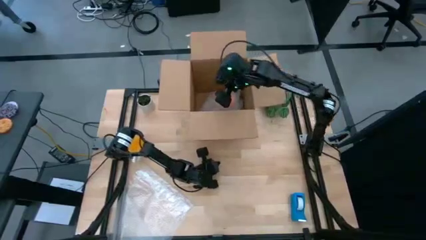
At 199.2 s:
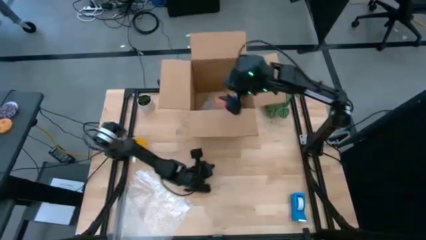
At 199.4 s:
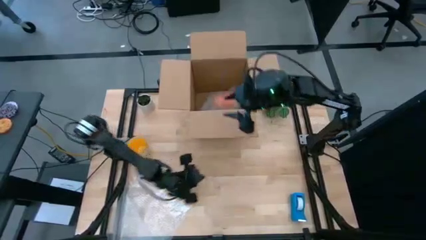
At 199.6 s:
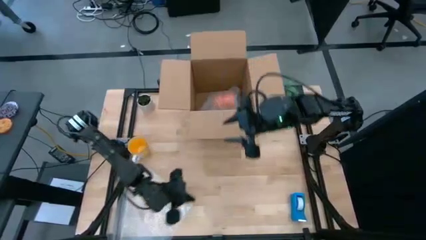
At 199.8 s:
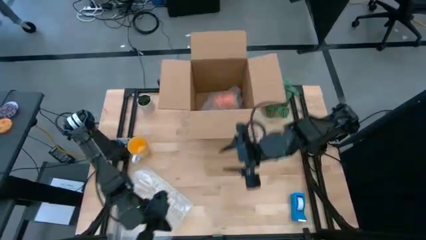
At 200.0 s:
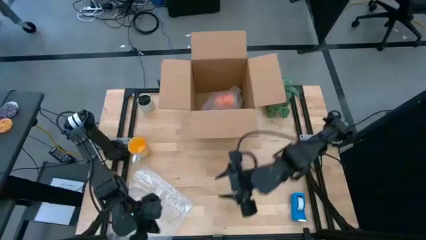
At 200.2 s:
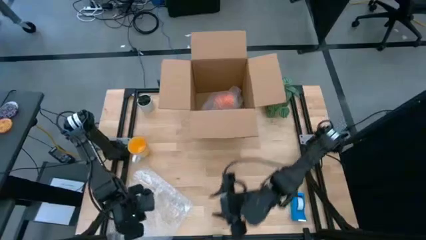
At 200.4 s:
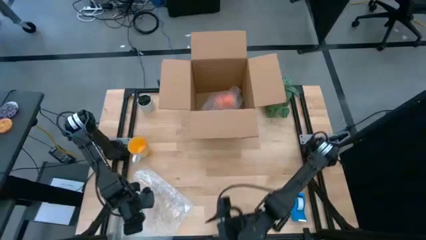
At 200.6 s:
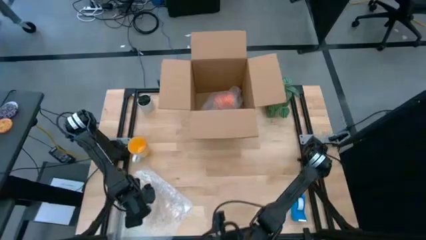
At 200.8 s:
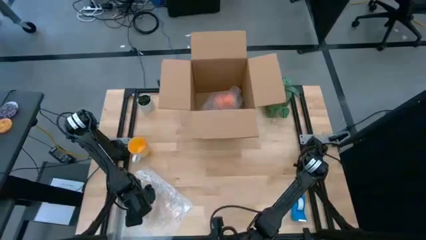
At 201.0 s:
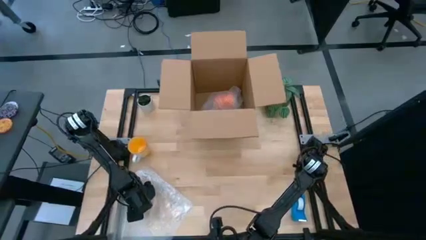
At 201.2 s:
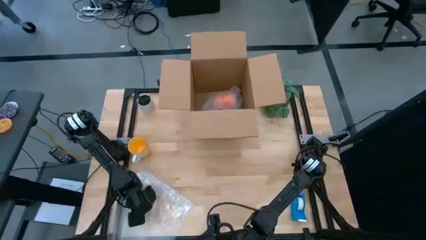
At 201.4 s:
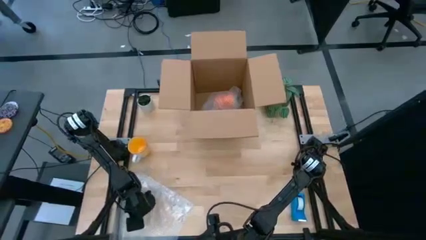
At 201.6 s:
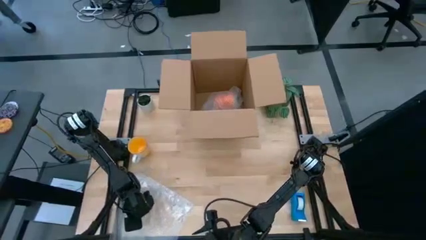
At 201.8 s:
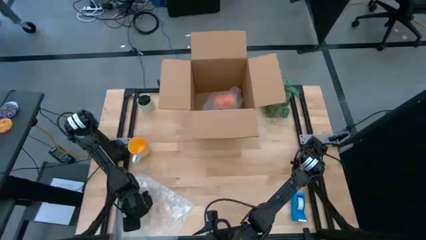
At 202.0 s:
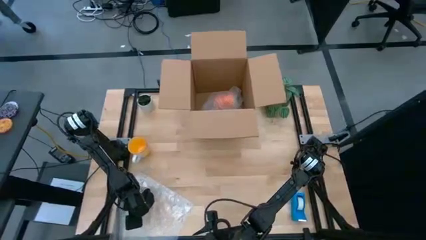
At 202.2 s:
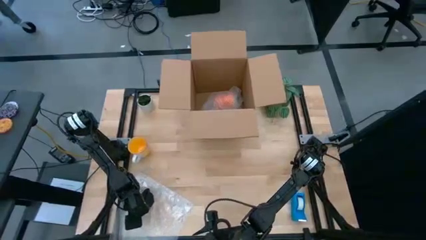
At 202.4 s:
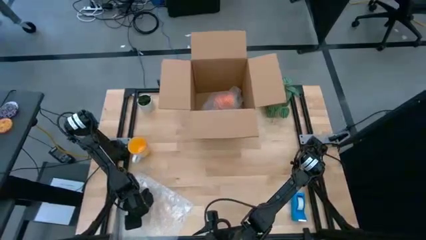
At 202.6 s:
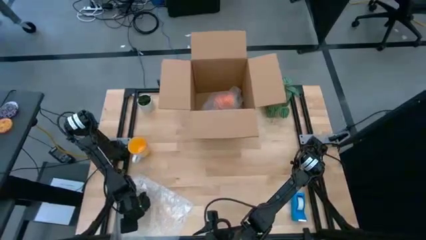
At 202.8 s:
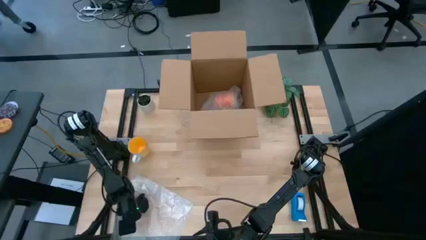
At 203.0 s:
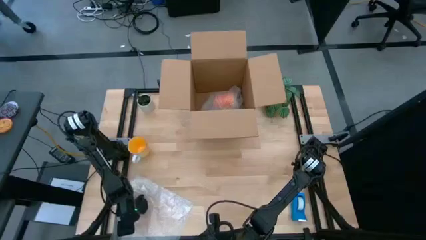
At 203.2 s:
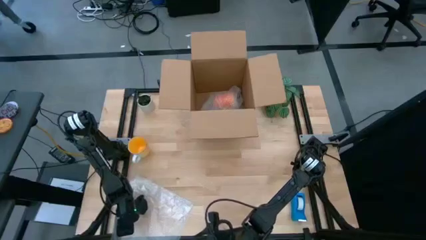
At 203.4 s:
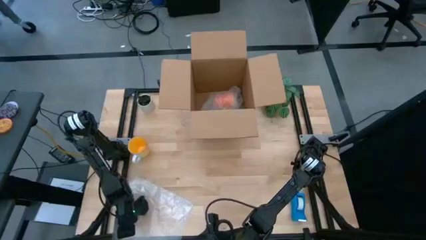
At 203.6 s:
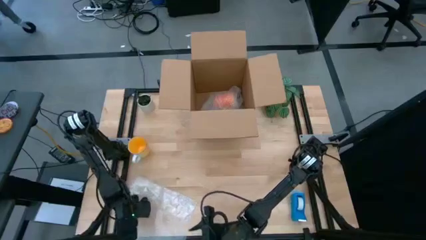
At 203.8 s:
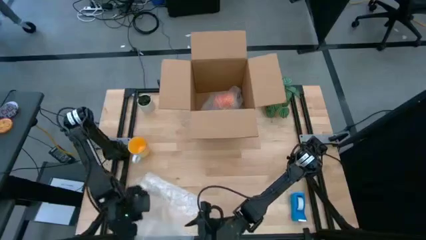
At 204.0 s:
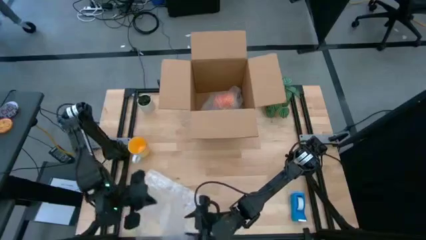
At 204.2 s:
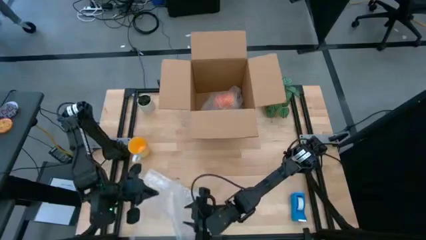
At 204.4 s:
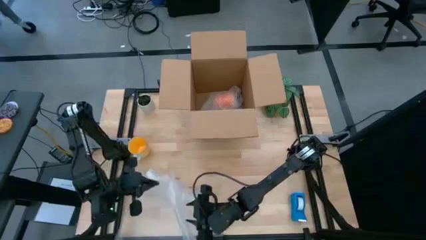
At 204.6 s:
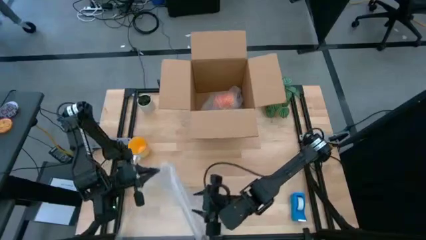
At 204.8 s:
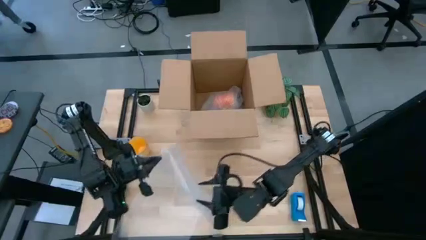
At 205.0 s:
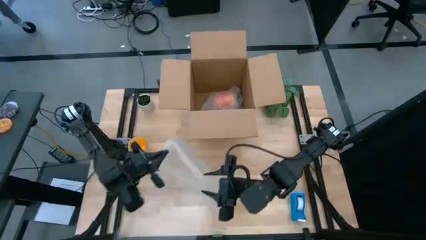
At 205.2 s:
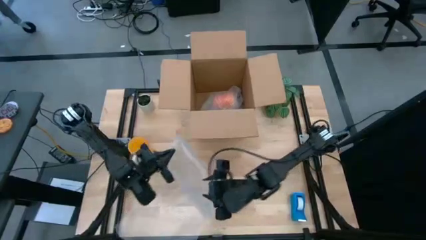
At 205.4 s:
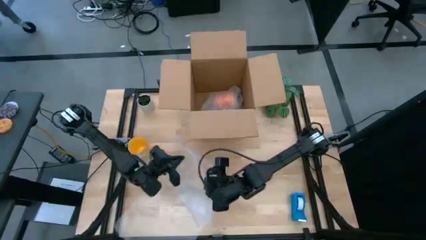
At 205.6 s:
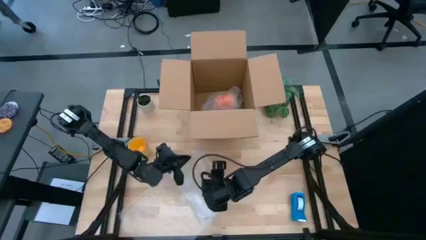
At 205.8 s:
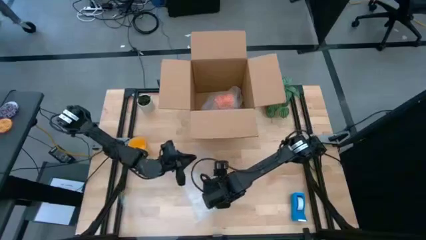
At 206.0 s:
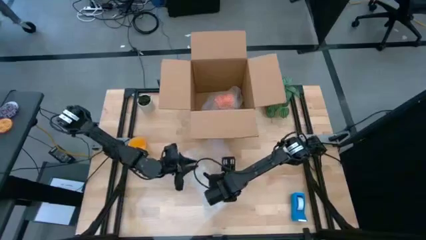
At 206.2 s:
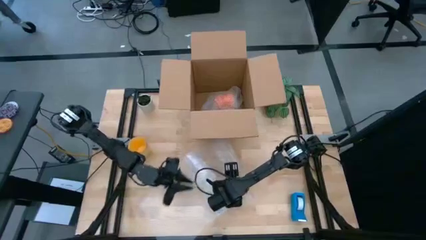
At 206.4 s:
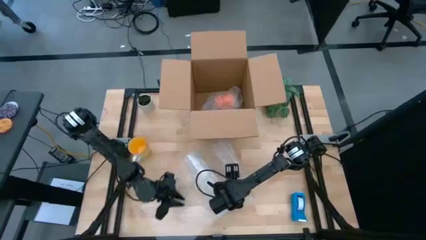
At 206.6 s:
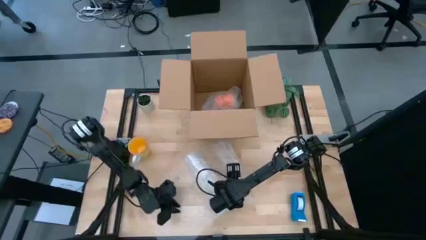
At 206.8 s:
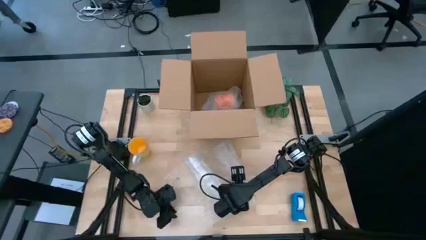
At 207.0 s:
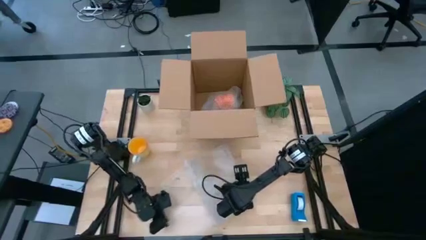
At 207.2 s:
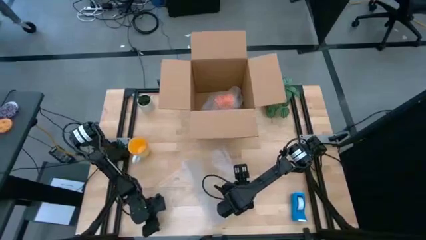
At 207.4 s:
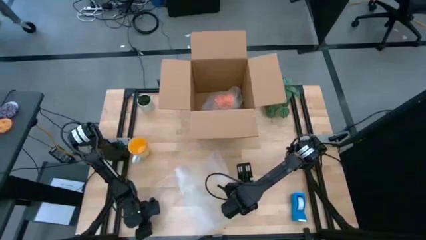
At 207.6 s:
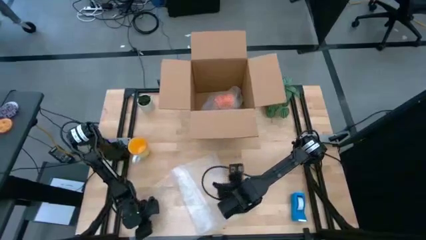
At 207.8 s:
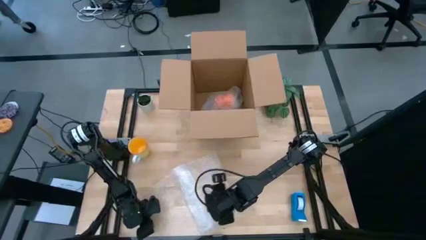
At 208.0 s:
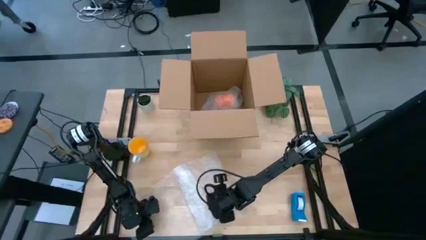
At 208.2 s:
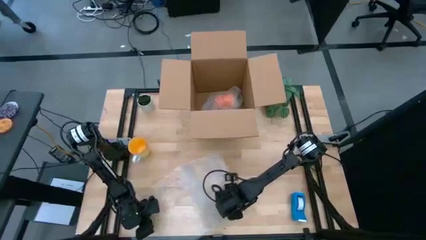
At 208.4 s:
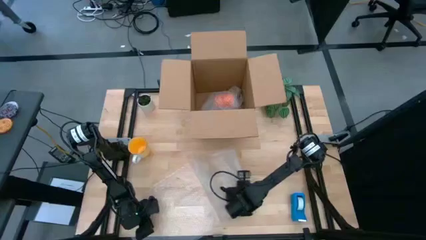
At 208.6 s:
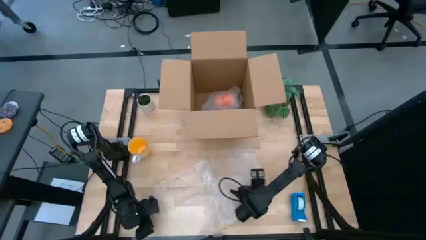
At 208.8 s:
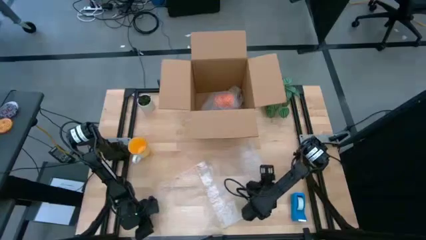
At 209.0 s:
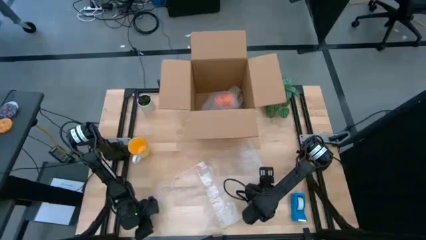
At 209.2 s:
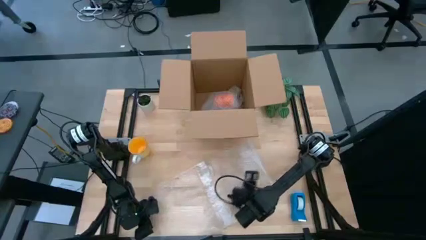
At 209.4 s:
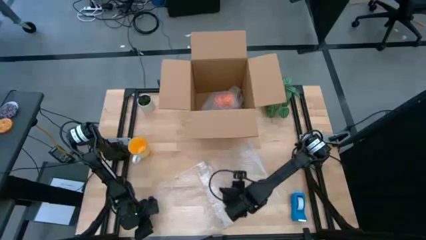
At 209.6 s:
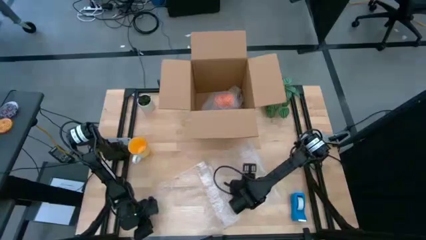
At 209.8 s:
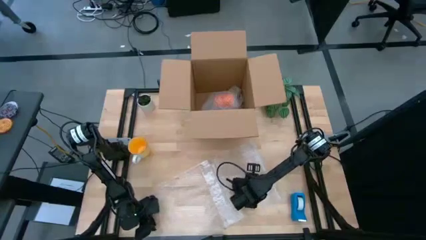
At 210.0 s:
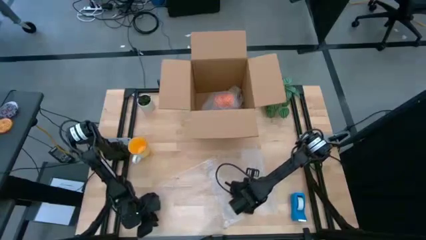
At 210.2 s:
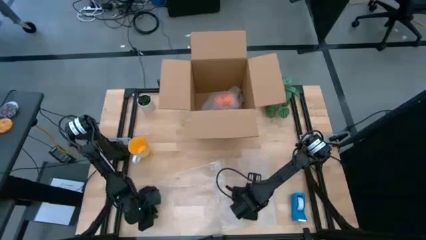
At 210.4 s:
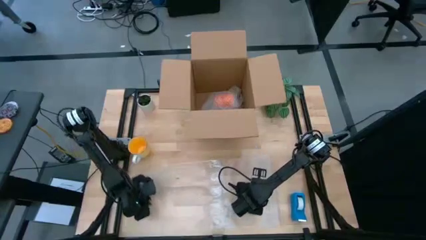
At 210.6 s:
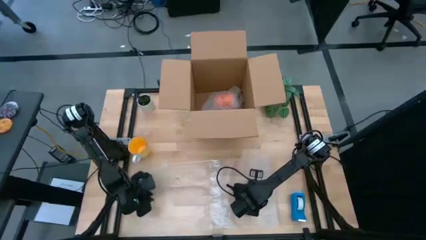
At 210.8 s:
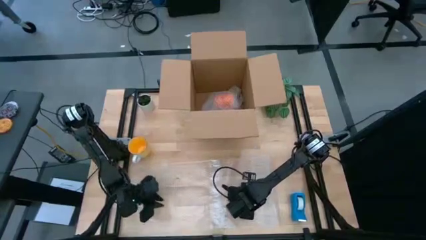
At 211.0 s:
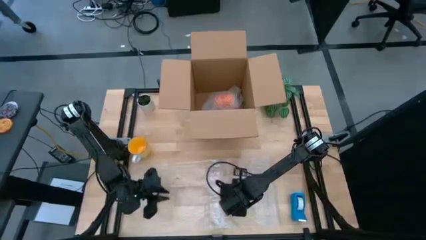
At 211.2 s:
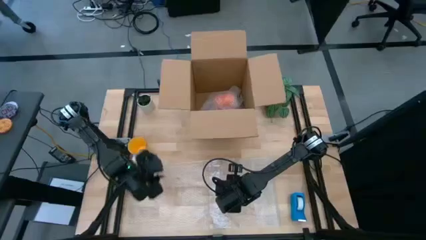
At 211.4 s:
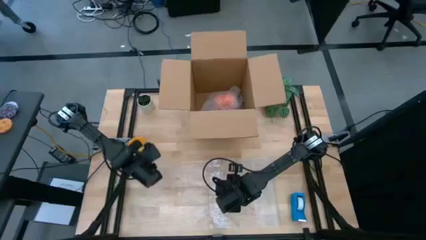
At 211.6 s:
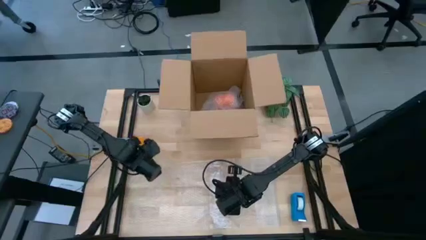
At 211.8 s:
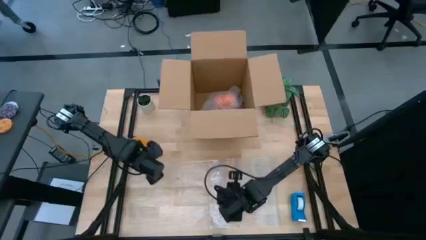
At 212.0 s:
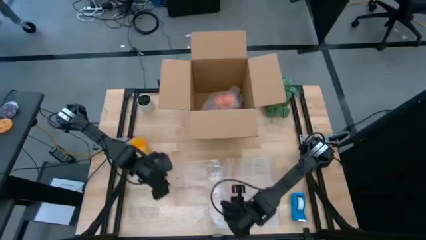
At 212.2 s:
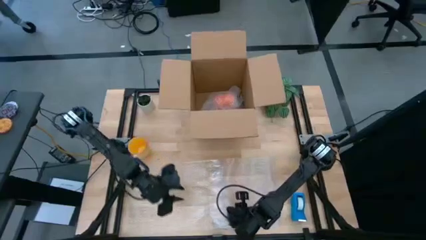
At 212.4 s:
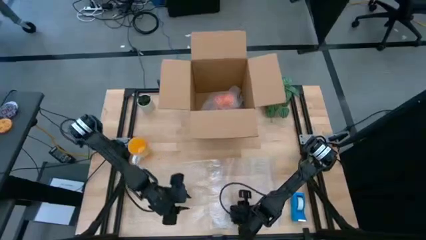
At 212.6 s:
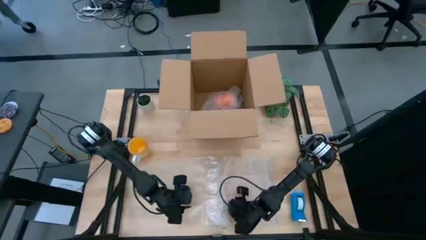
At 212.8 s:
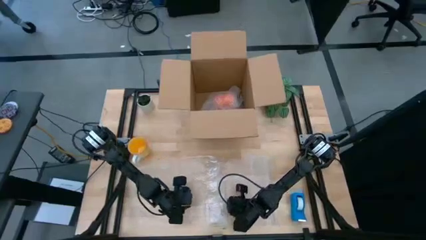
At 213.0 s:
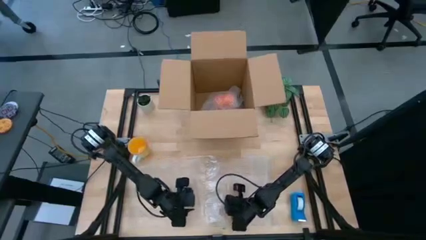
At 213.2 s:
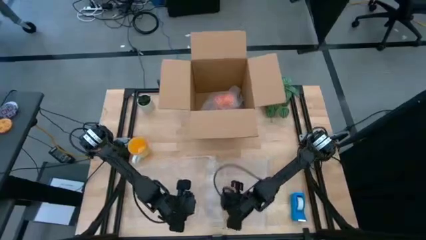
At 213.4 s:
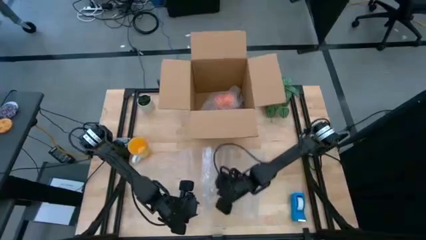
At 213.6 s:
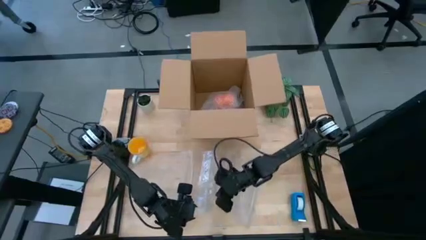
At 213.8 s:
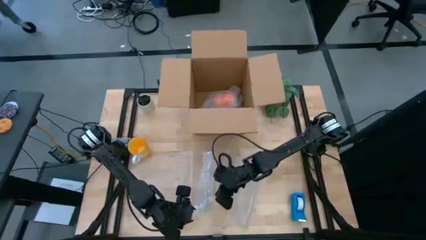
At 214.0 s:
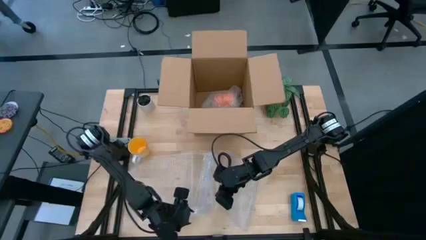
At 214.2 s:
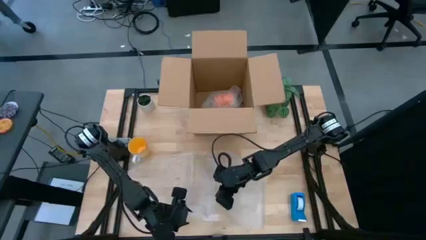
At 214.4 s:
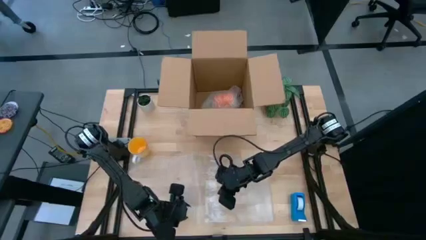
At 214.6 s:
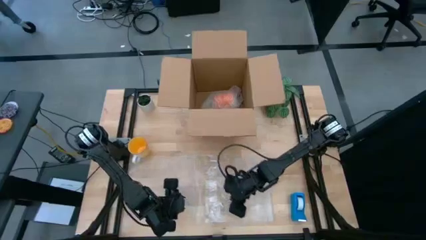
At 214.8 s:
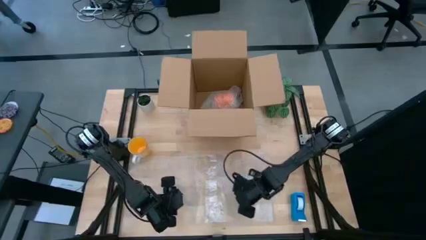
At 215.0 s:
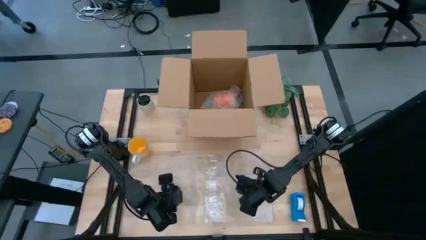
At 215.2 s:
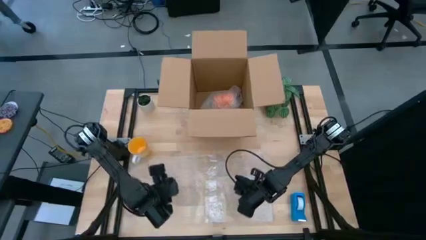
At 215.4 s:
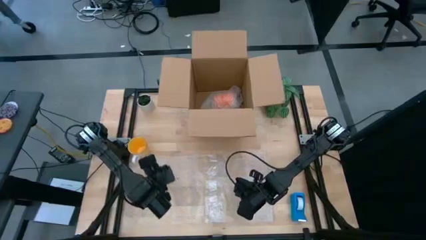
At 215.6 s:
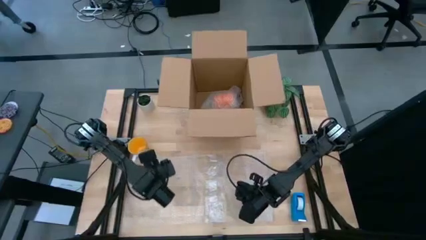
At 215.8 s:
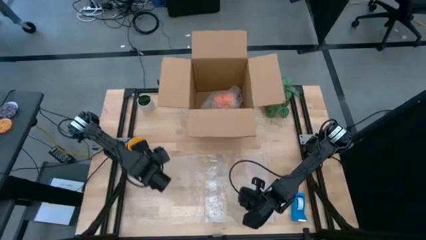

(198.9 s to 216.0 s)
Task: wrap mug
Wrap the yellow mug with the bubble wrap
